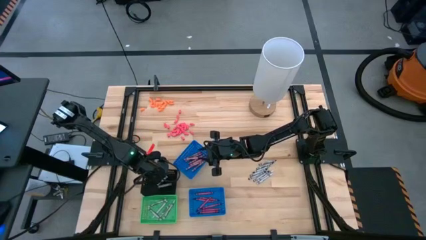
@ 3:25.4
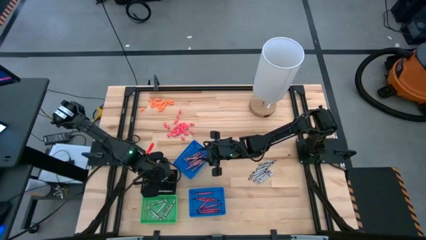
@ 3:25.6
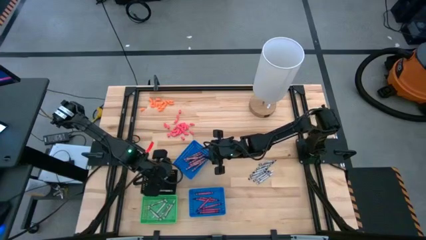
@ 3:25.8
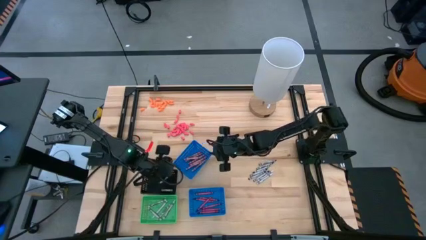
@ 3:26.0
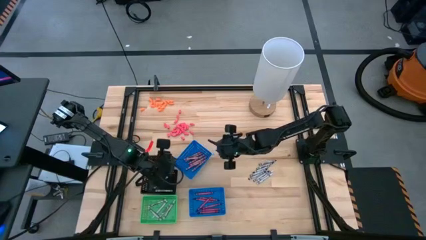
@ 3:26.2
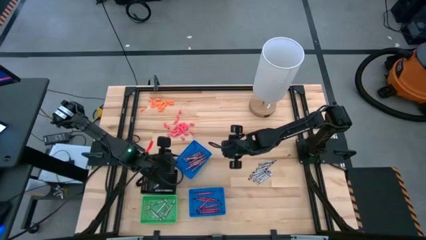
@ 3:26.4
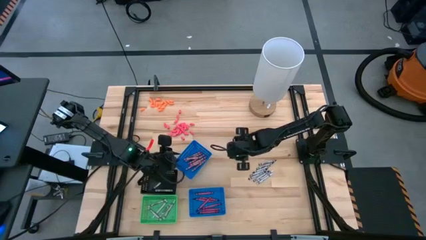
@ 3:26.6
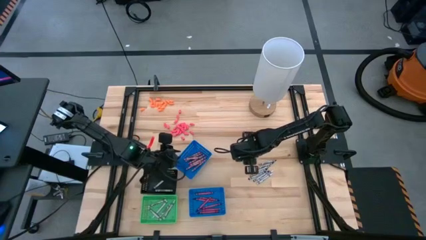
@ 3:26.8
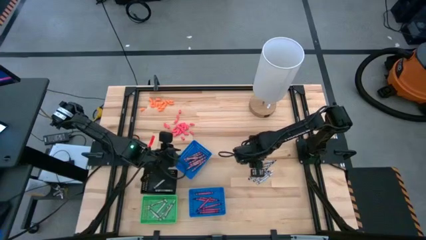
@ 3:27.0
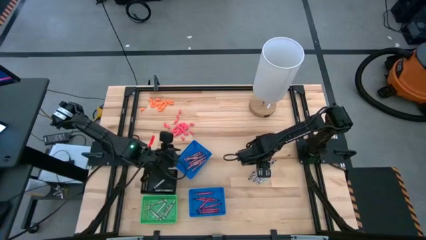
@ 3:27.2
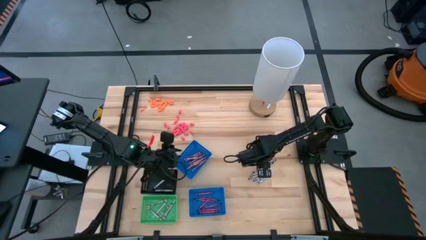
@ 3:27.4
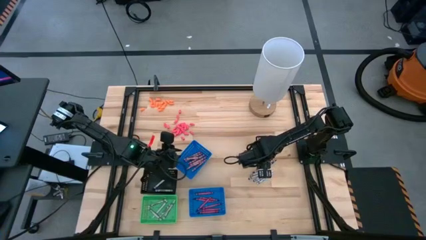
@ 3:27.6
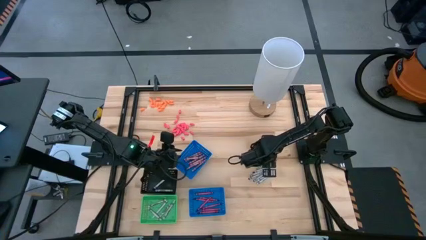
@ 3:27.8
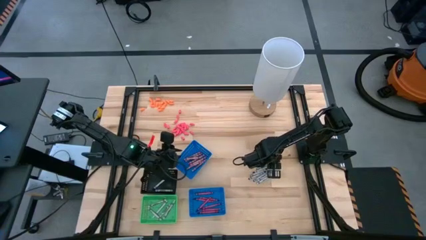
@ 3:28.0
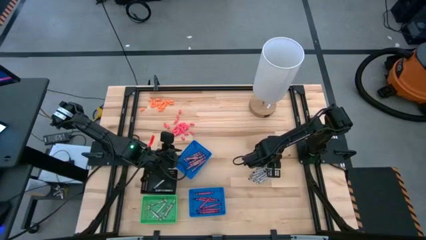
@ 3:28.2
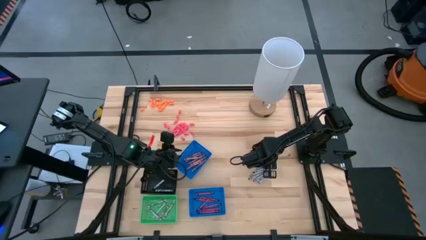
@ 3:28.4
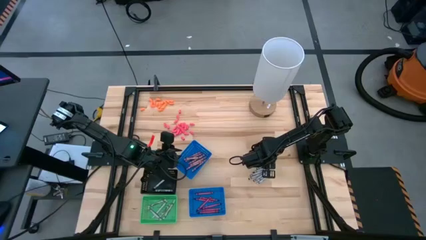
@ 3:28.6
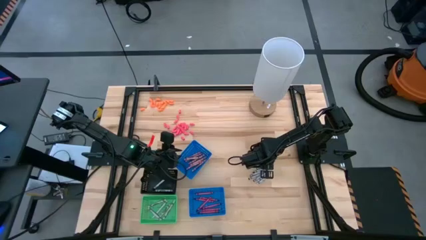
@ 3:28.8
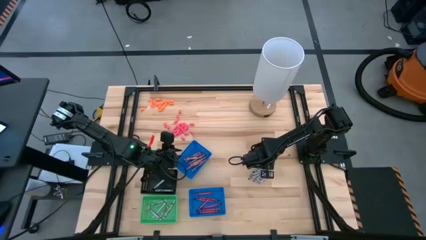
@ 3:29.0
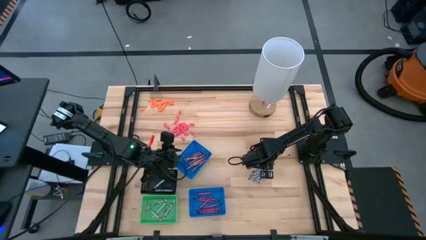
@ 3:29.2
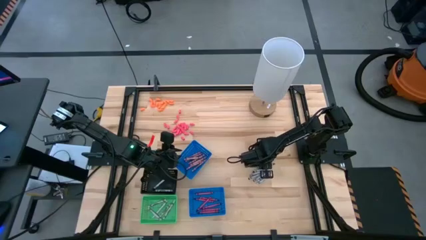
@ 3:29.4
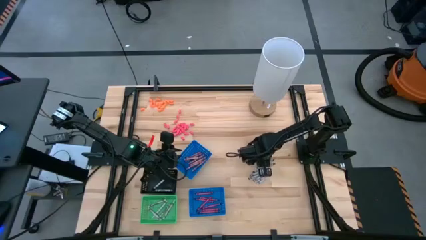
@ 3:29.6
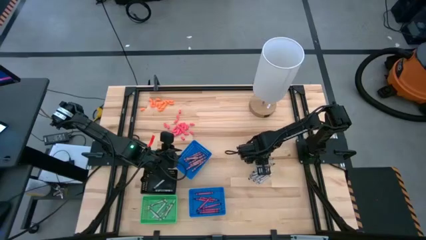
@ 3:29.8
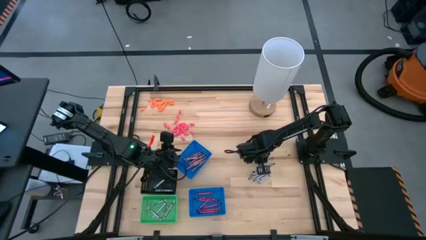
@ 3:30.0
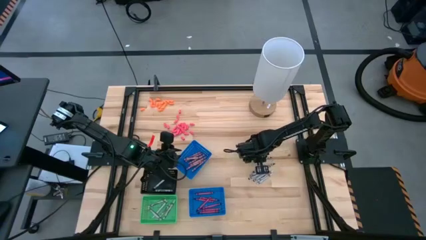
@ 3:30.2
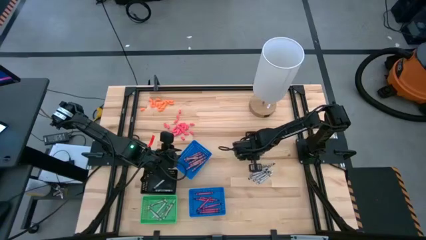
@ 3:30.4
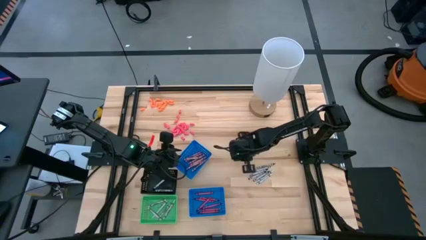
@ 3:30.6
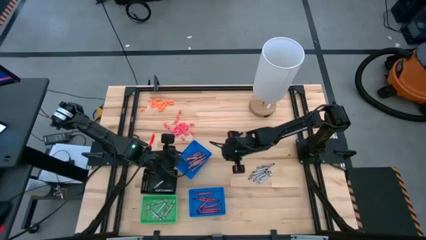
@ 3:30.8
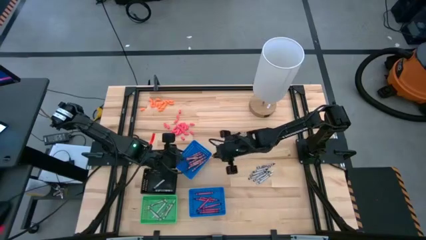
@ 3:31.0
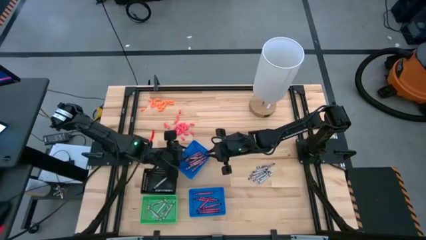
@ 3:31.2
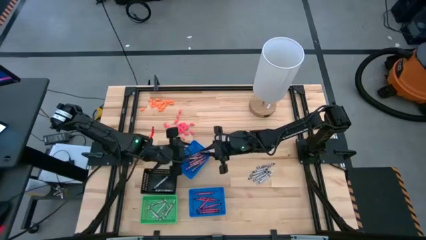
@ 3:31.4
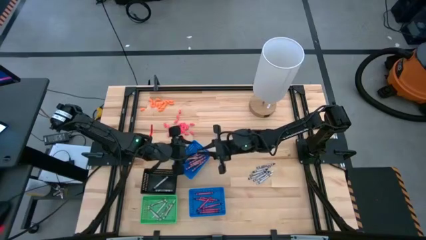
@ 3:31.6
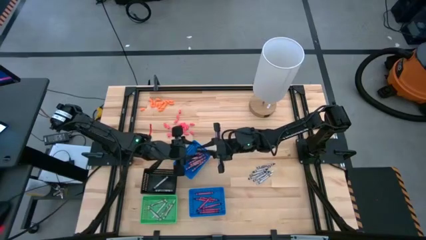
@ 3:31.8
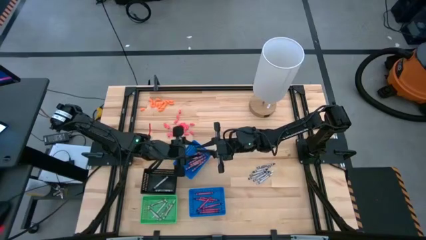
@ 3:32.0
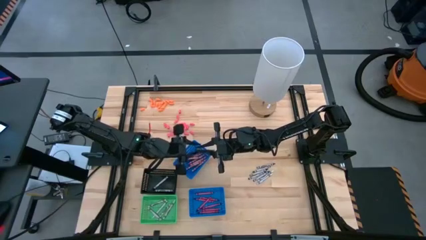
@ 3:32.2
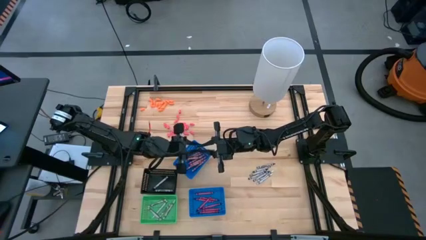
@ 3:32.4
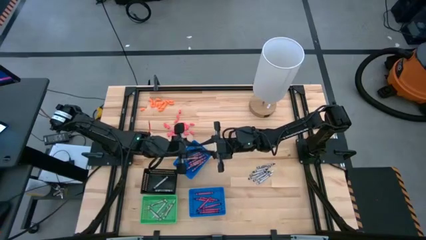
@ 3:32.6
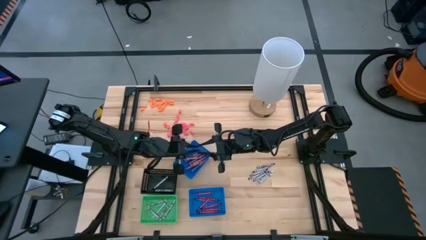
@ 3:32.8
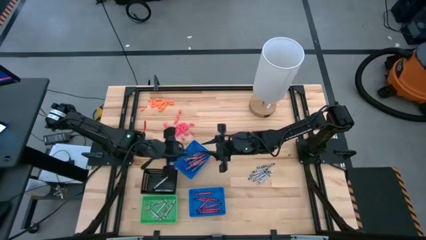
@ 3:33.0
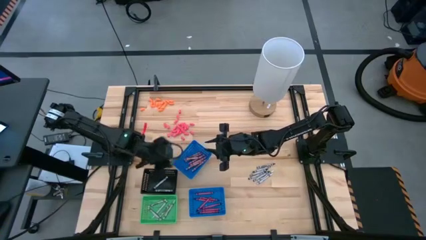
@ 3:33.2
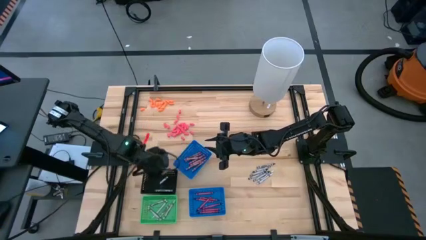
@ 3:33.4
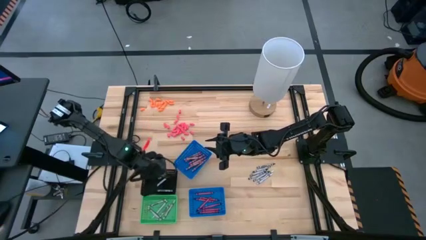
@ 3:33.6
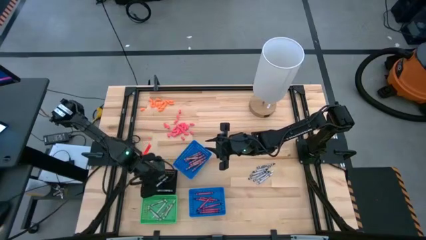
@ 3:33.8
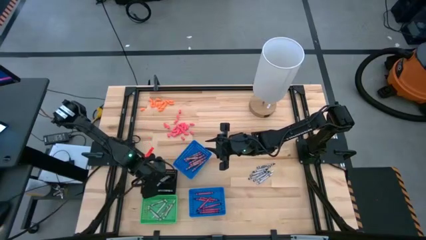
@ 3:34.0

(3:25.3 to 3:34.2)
Task: Sort crayons
Put the black crayon into the black bin

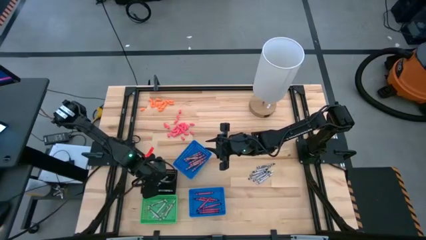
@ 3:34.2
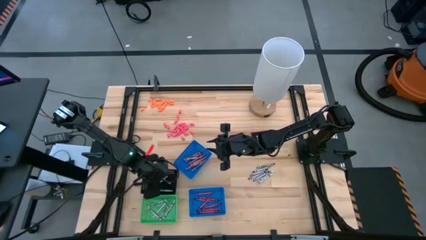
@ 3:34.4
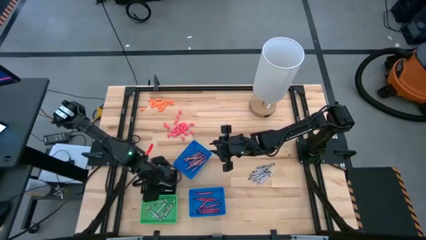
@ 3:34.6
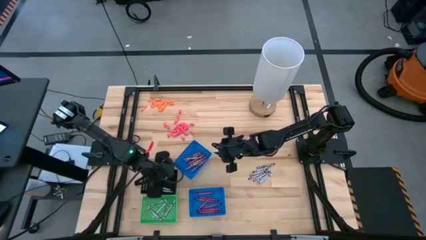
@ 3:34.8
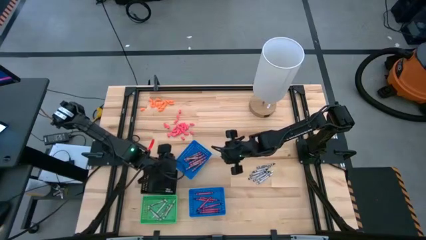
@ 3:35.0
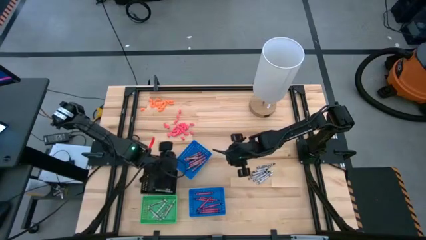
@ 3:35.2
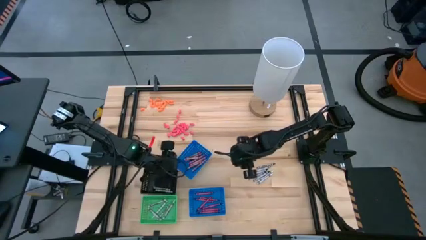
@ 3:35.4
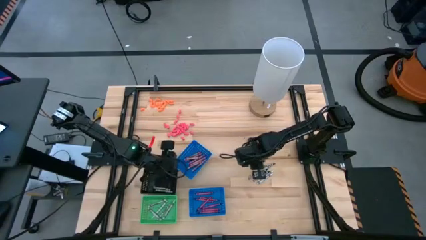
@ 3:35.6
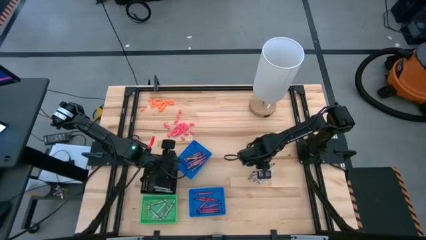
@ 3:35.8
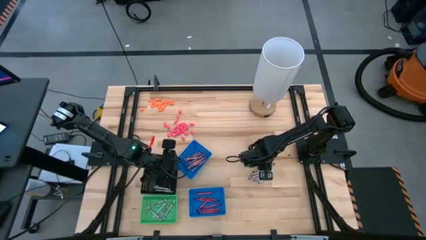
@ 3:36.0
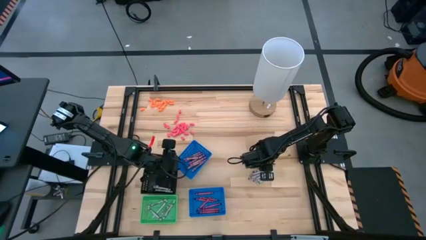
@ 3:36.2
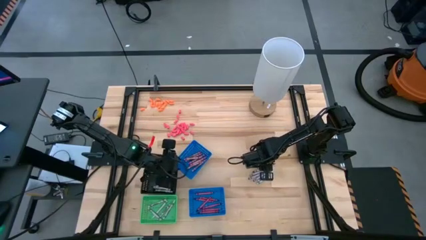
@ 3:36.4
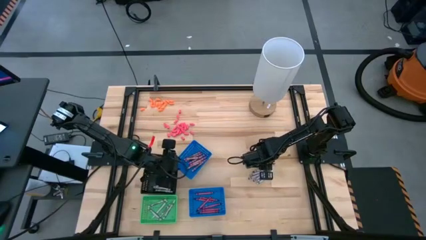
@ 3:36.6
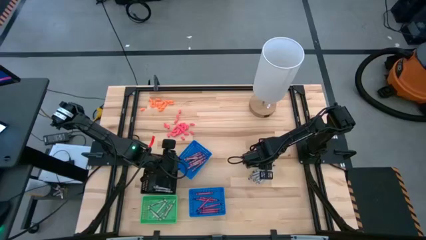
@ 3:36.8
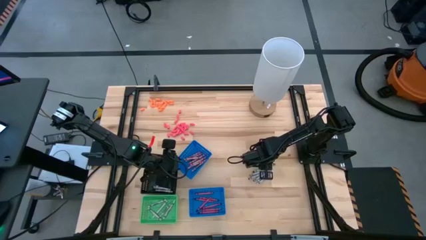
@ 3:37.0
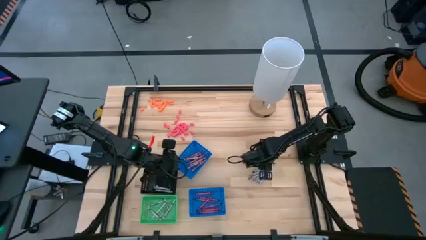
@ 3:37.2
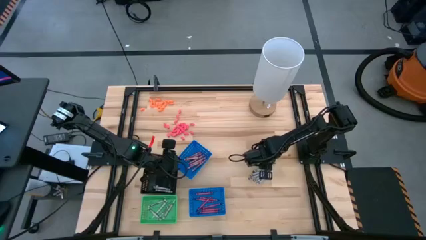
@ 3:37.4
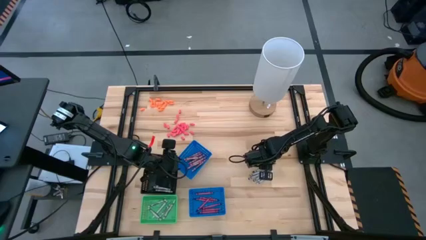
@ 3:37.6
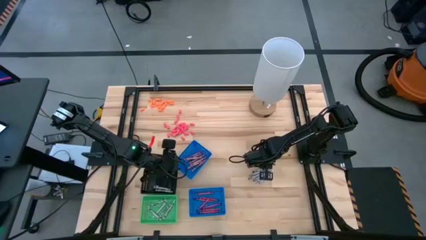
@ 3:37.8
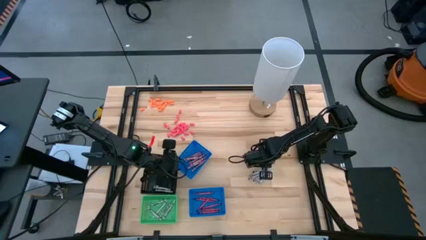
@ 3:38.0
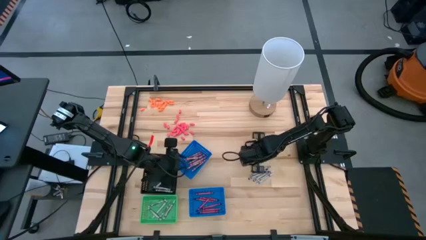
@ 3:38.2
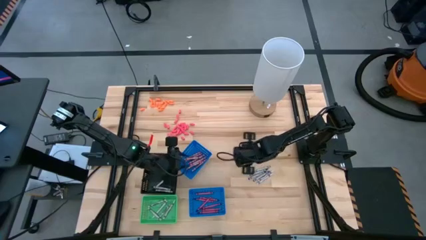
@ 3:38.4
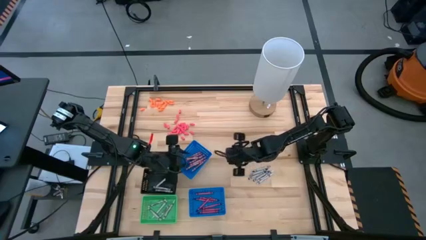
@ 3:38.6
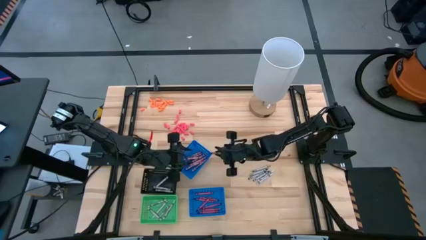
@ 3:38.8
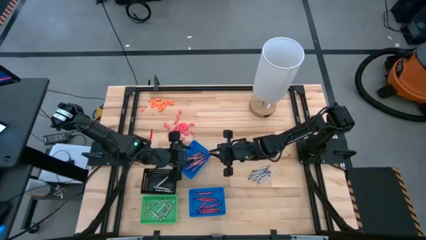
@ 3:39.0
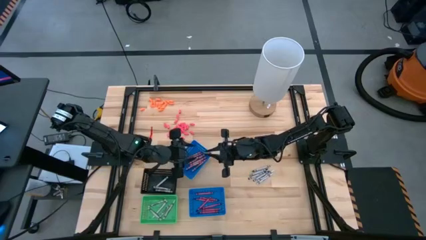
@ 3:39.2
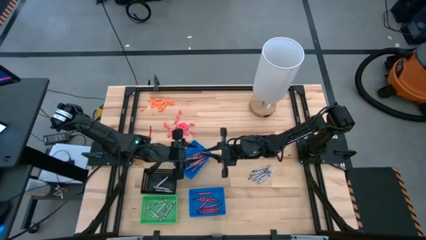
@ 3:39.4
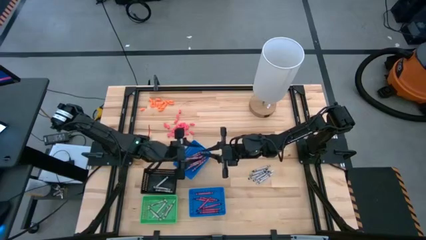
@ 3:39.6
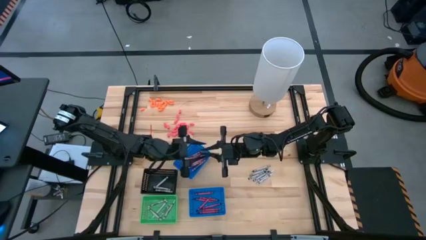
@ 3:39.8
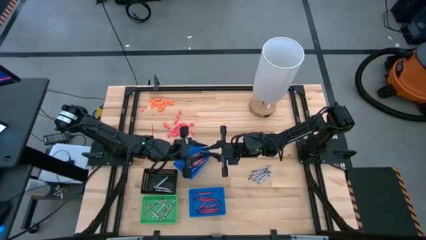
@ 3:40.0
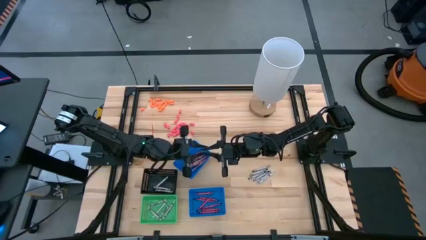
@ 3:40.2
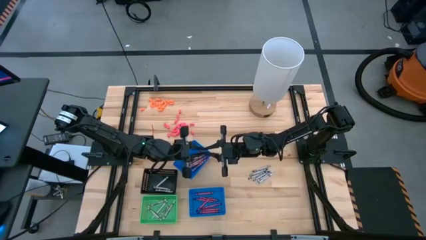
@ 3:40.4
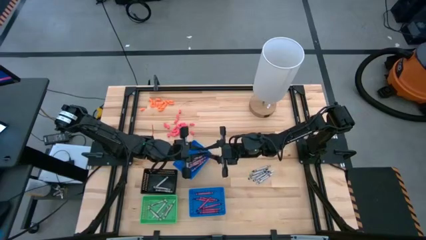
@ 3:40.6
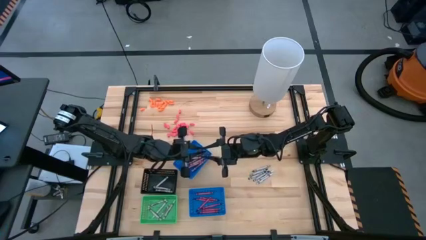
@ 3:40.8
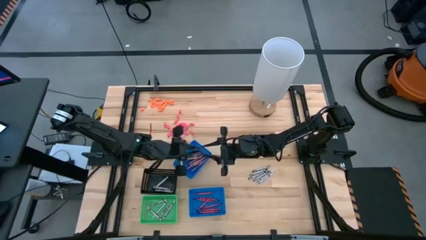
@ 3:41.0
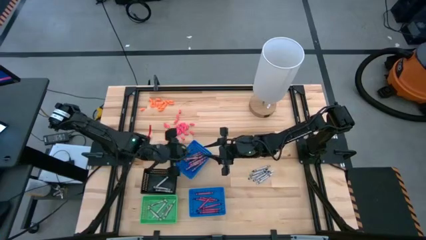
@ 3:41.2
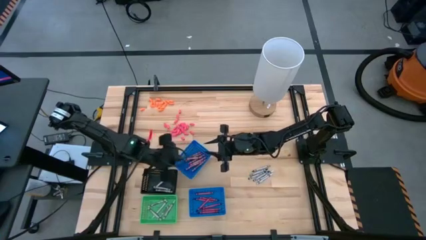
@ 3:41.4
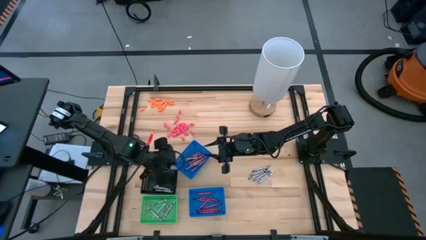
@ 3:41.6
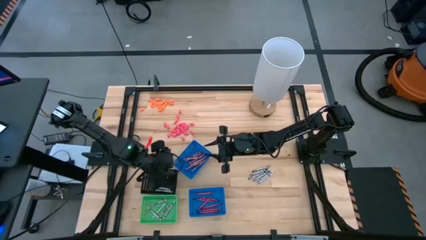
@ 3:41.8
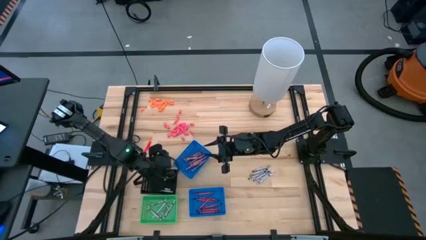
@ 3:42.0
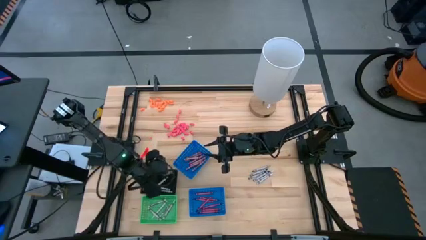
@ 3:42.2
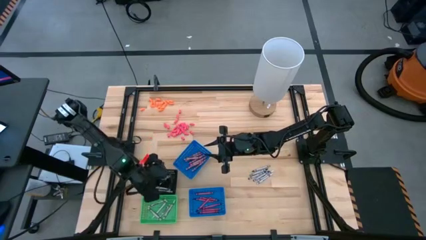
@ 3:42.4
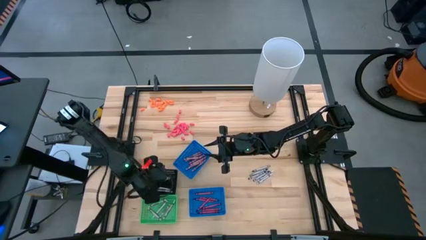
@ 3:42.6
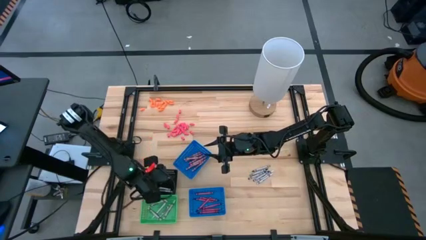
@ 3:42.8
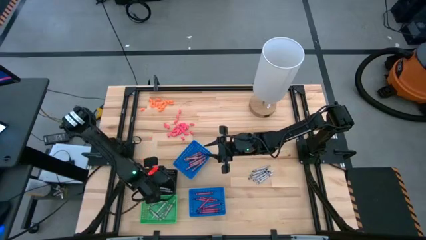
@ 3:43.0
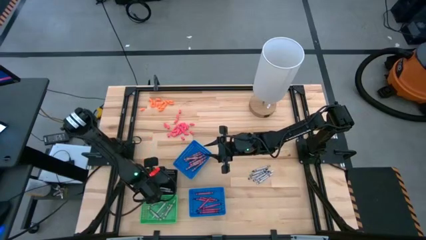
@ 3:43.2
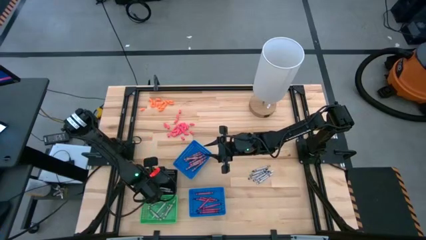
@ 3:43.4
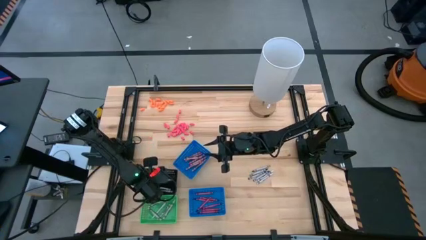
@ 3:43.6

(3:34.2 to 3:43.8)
Put the black crayon into the black bin
